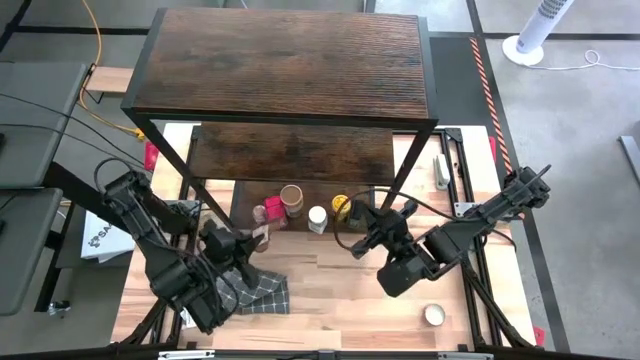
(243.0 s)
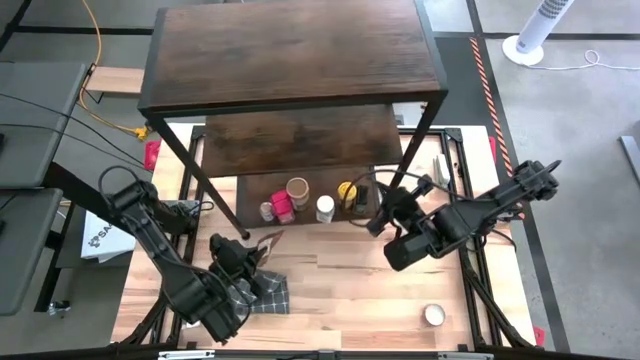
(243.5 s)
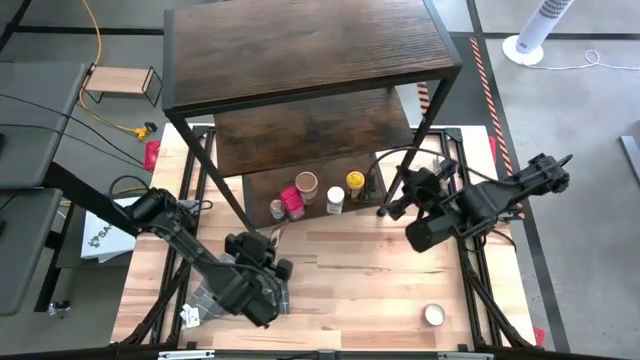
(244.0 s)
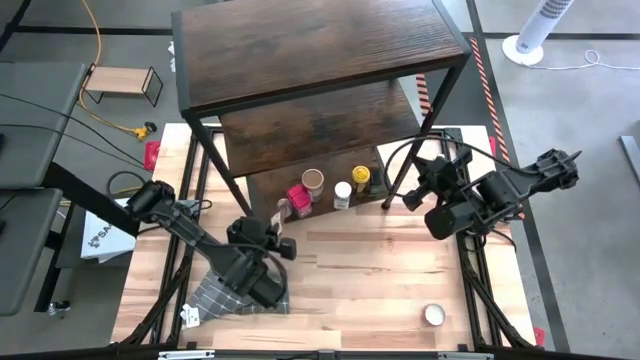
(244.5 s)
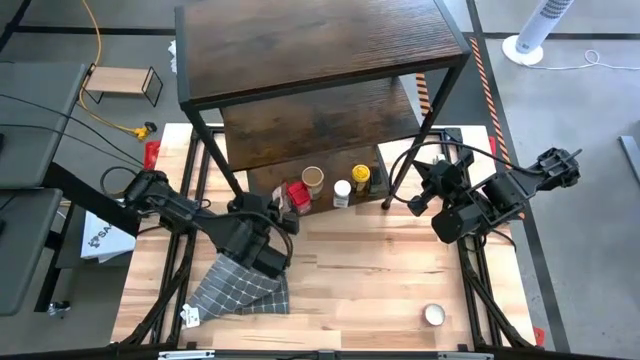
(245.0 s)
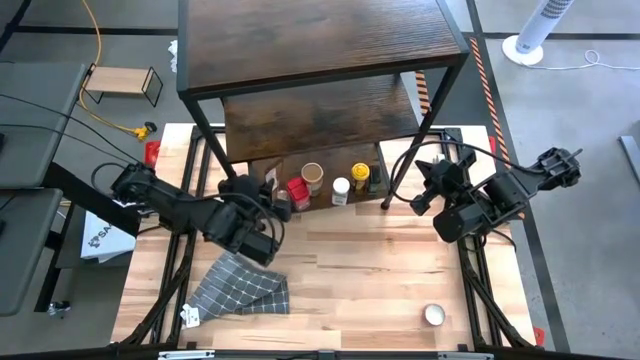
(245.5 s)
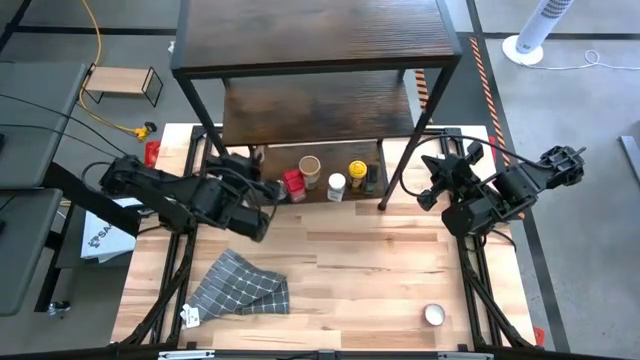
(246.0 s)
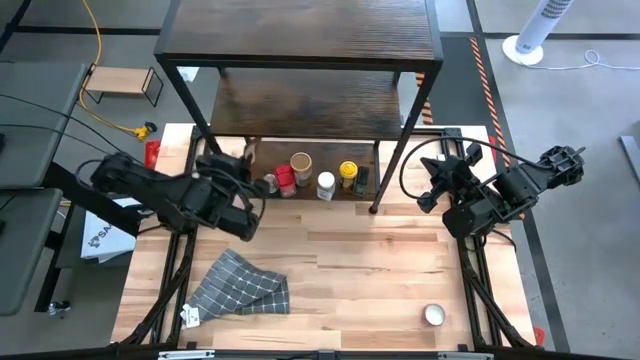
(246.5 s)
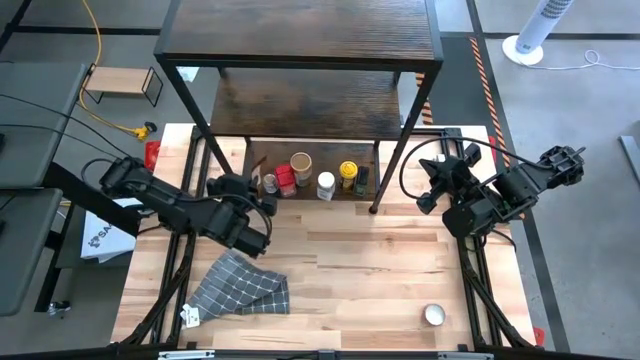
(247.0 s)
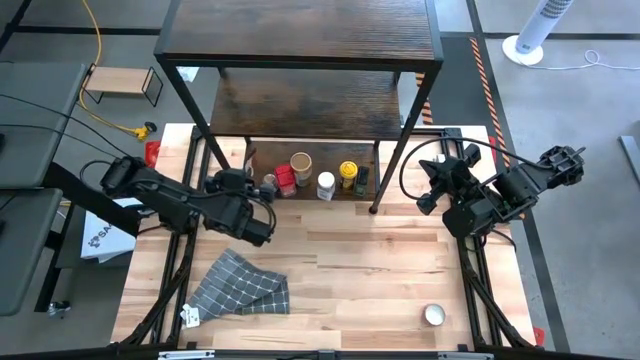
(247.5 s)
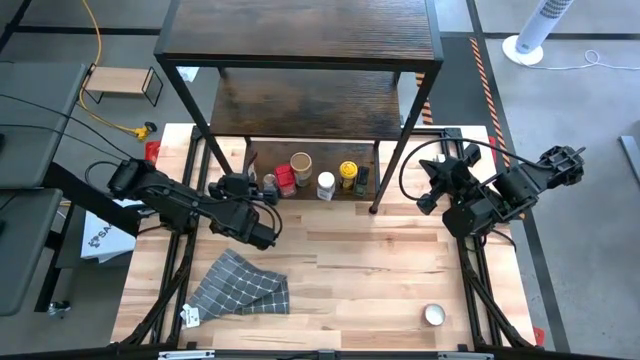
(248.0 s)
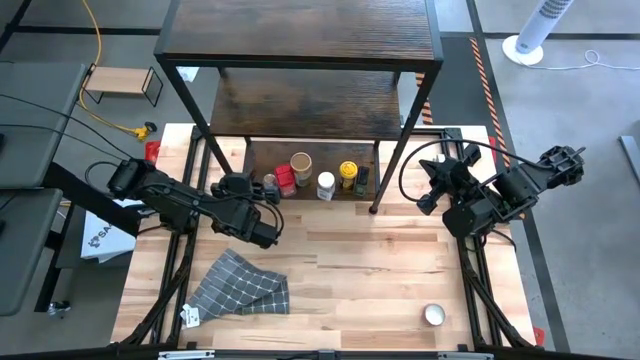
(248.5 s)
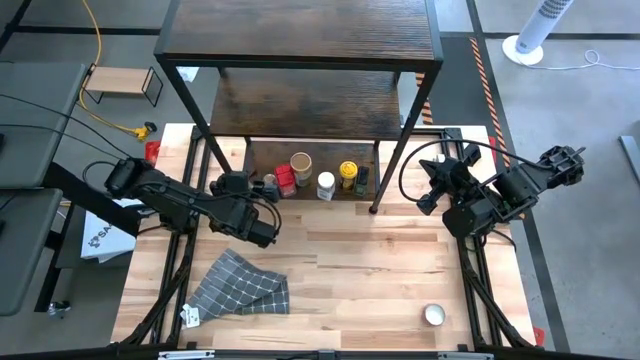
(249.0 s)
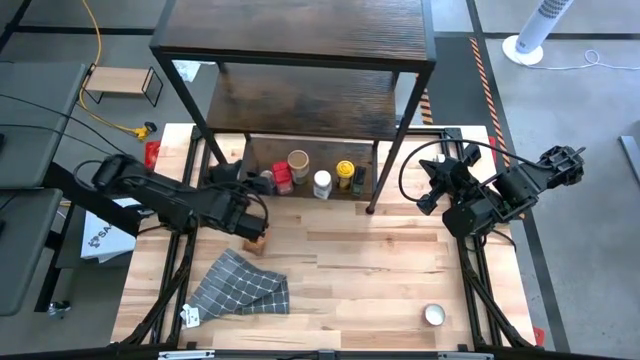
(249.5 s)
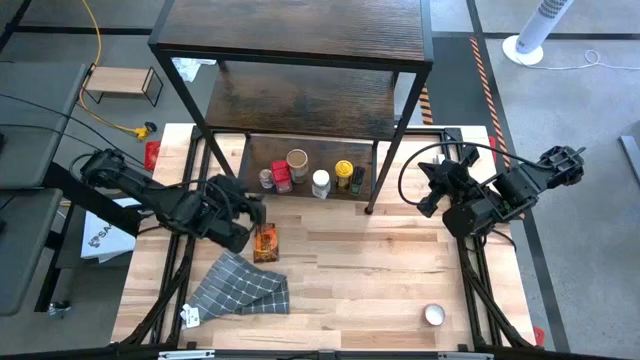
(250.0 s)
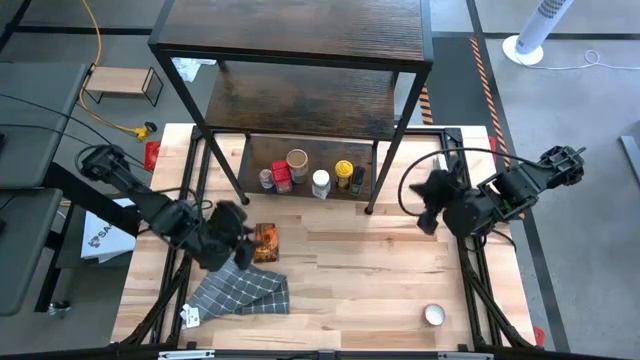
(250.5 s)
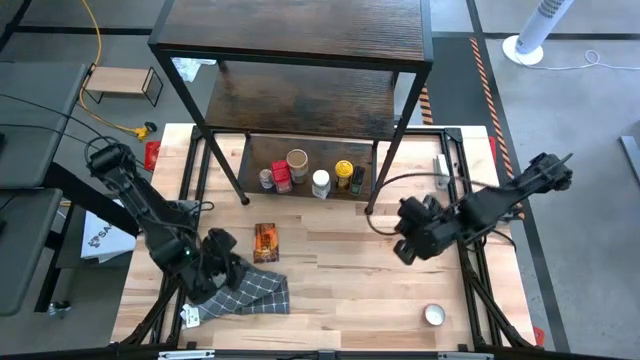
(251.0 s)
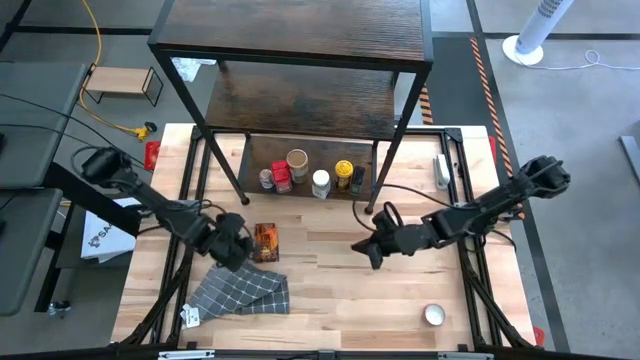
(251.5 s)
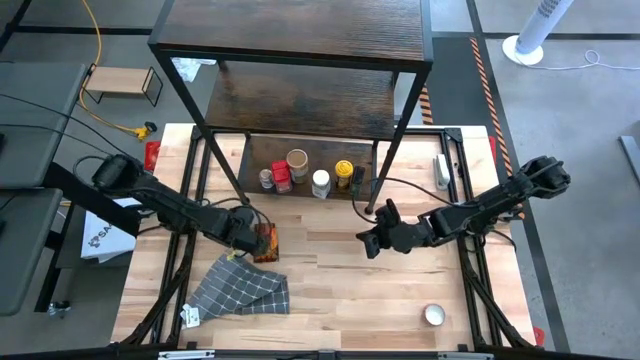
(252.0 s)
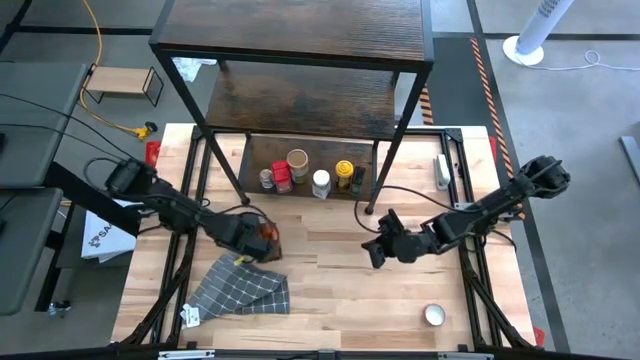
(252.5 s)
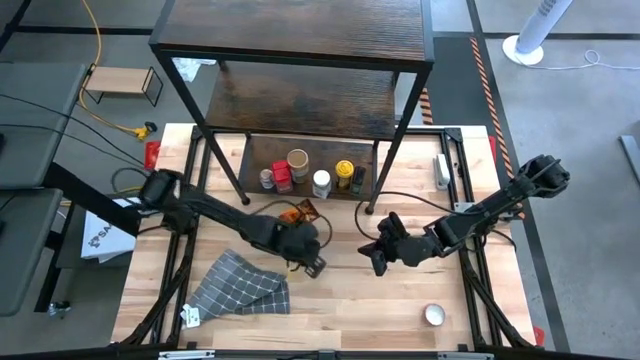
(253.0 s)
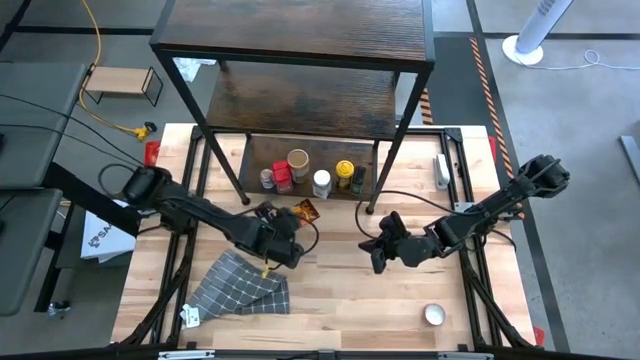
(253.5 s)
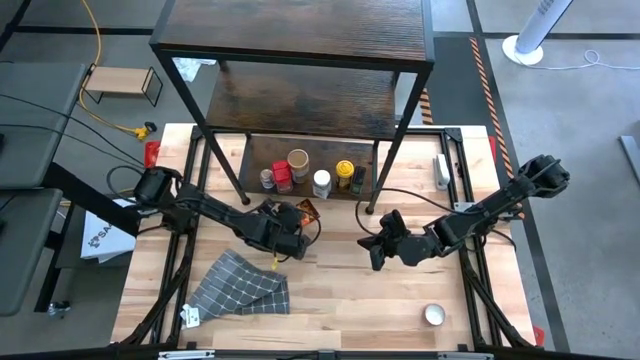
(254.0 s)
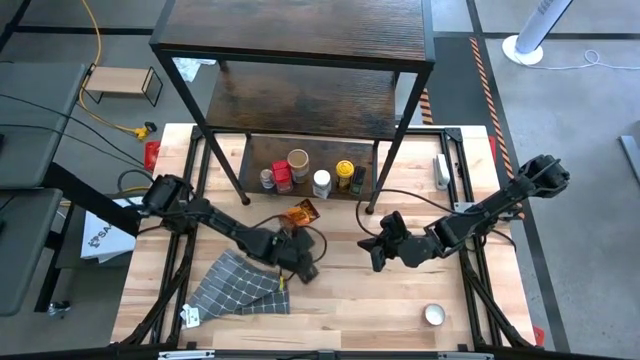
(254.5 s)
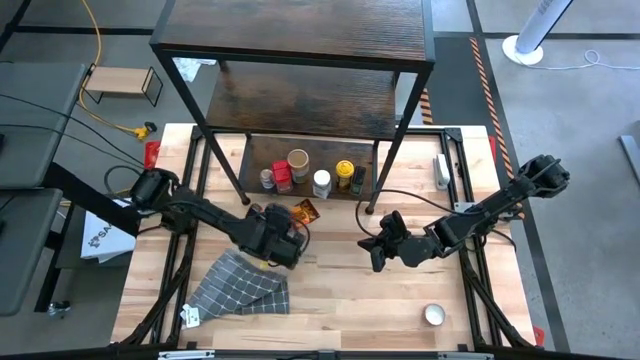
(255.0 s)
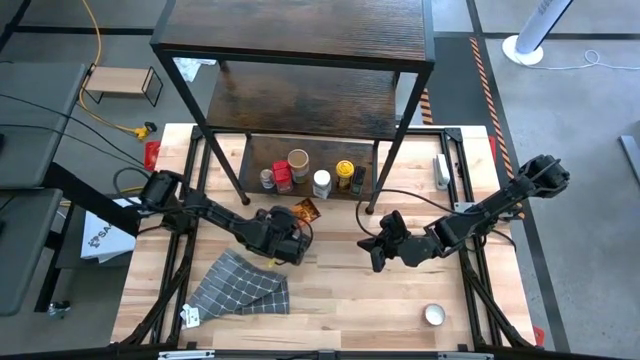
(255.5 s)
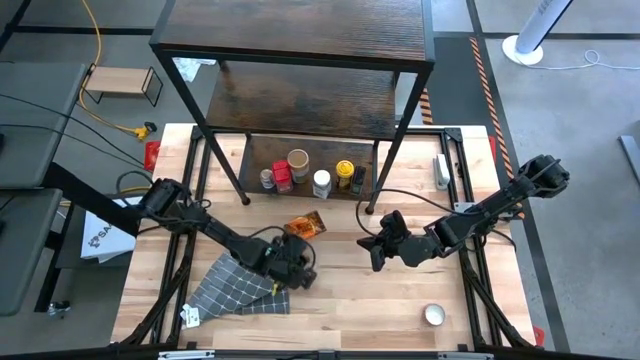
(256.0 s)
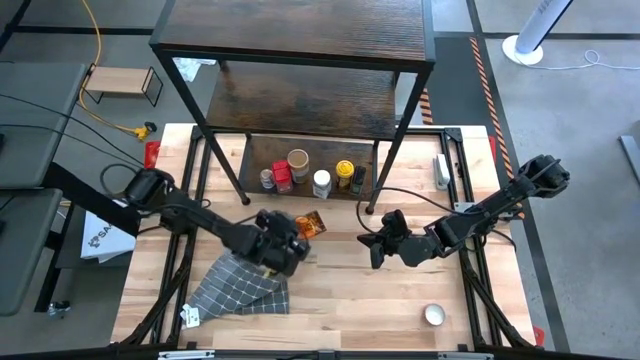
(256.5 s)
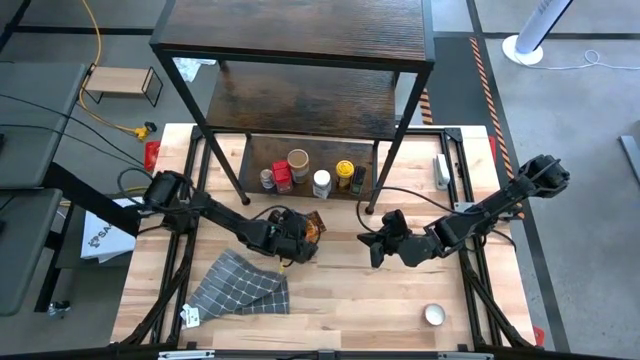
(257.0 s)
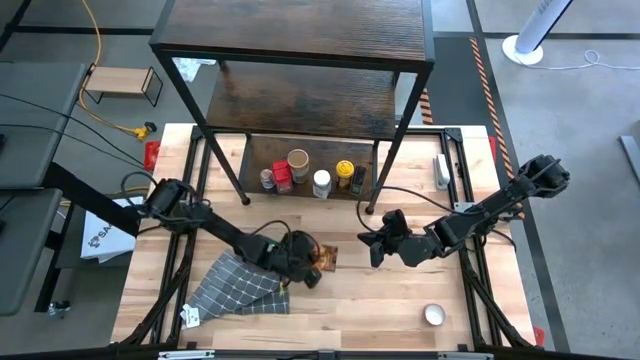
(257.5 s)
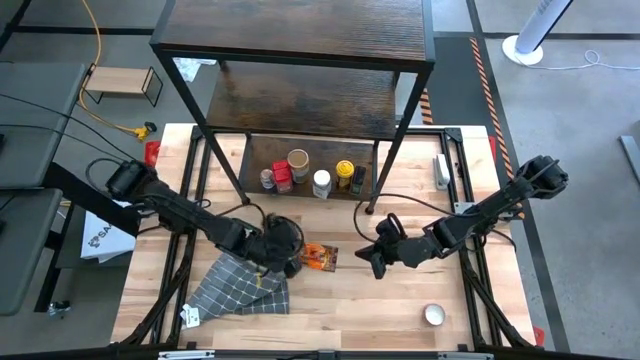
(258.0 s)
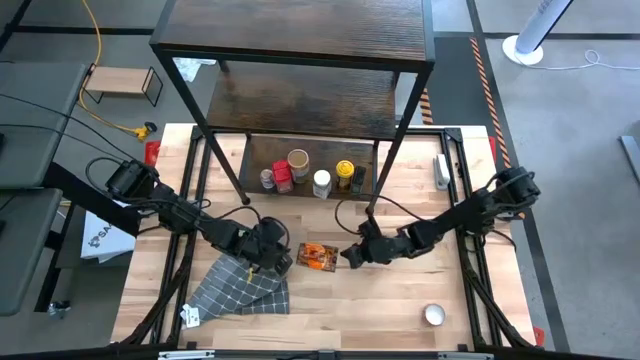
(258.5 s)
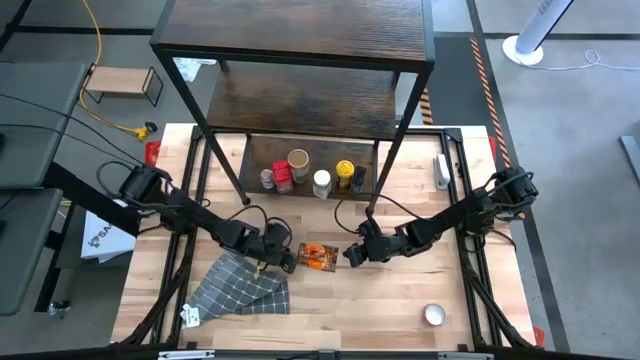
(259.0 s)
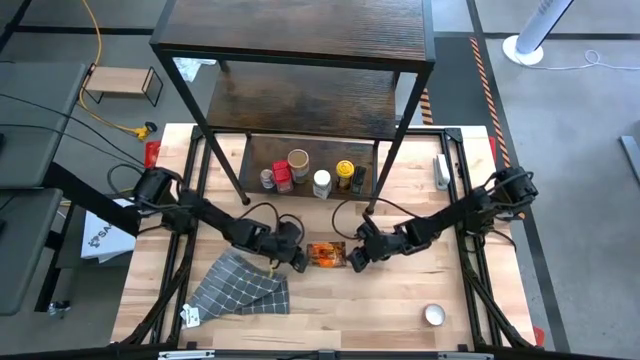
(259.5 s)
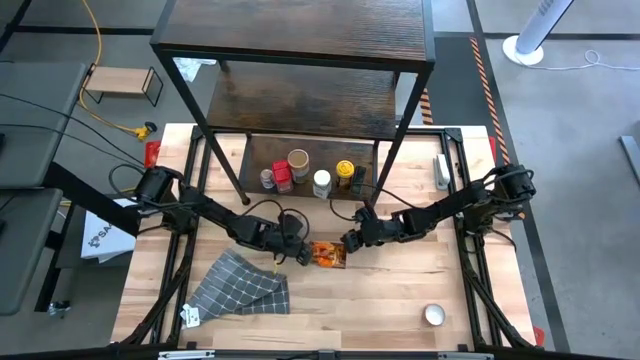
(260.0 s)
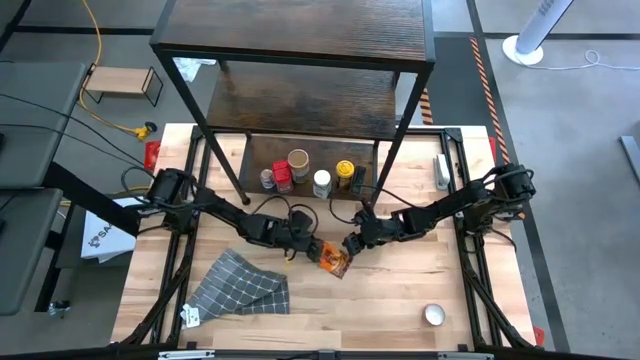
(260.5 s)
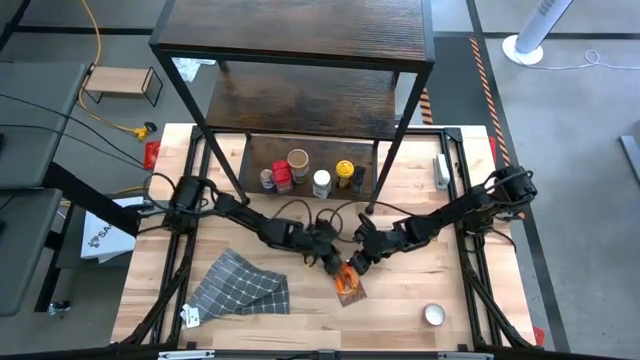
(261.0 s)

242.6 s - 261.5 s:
Task: Shelf spices
Put the orange seasoning pack on the shelf

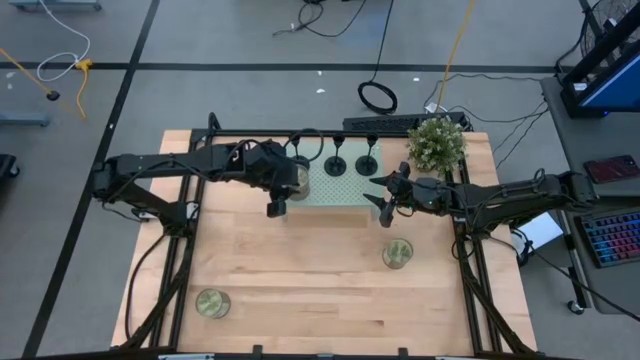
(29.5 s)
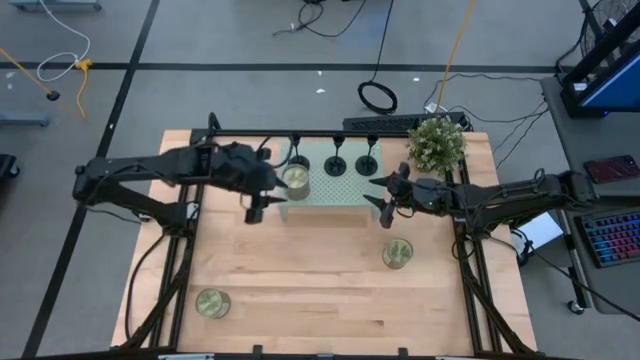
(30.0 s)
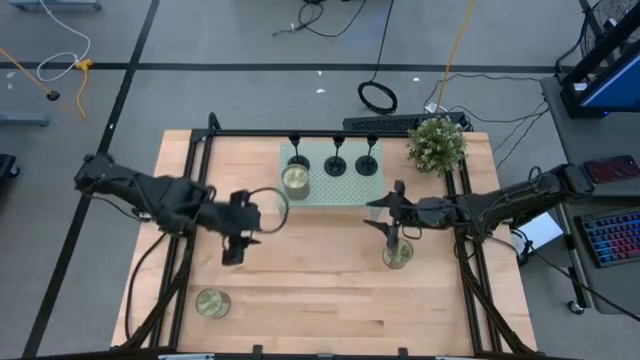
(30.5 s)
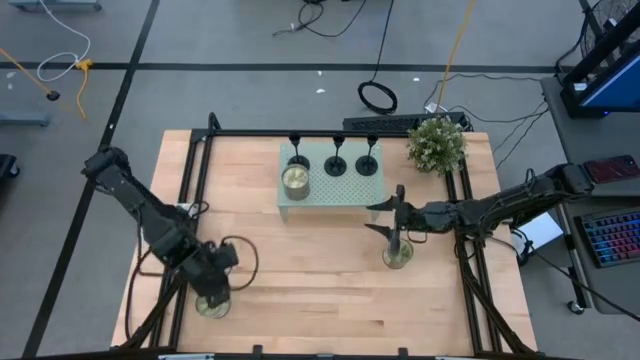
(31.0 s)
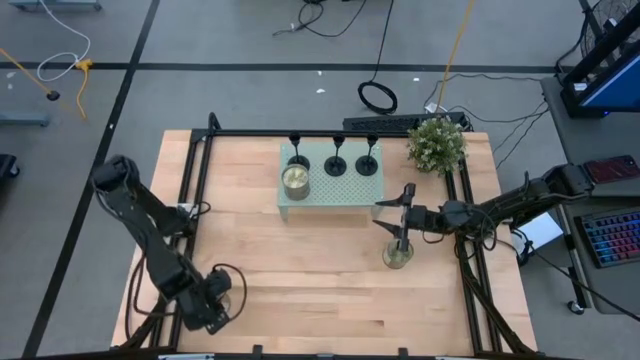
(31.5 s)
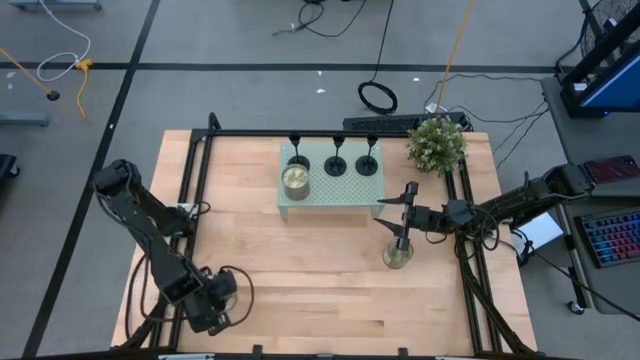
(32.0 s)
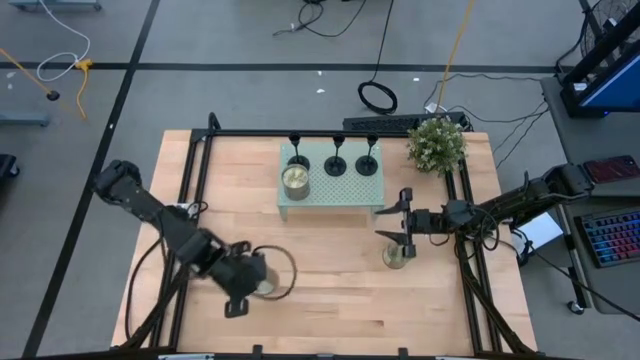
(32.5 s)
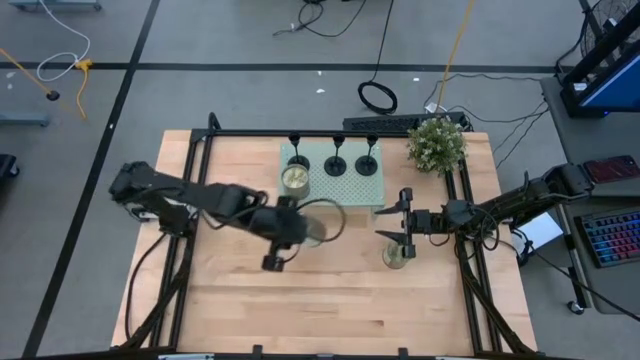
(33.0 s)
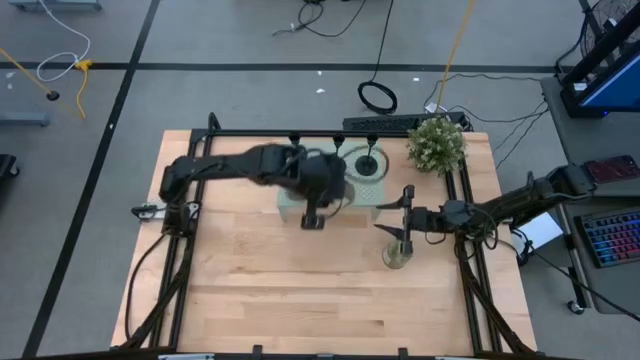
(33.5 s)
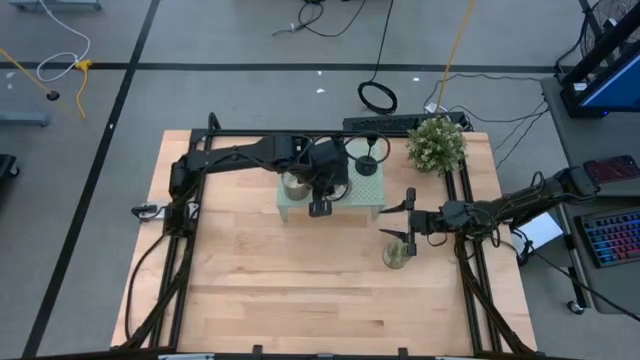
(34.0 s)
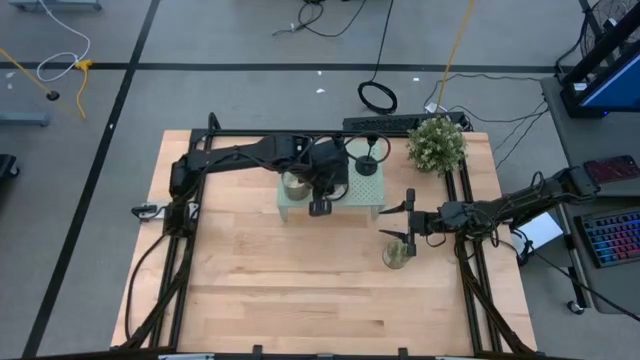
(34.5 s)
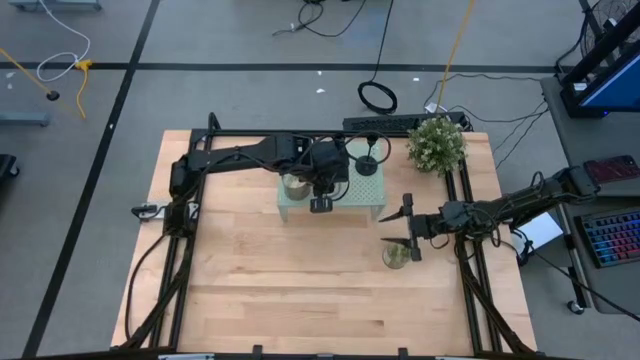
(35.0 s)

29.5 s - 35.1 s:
Task: Stock candles and holders on shelf
Align the scented candle on the shelf with the other scented candle
